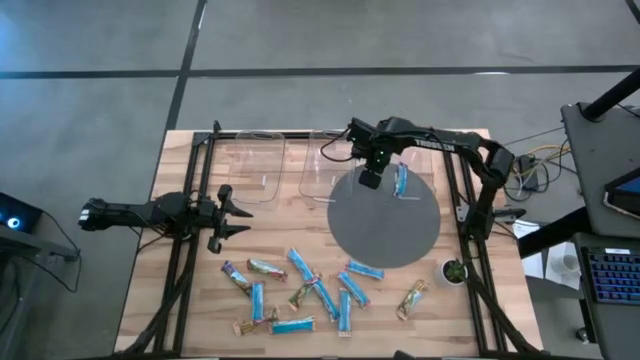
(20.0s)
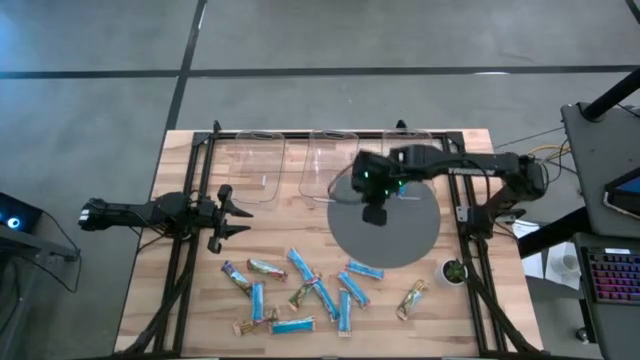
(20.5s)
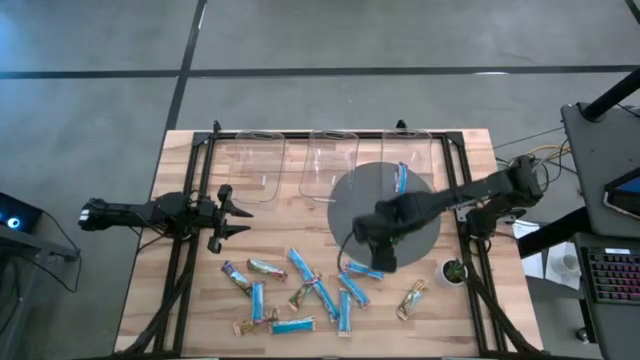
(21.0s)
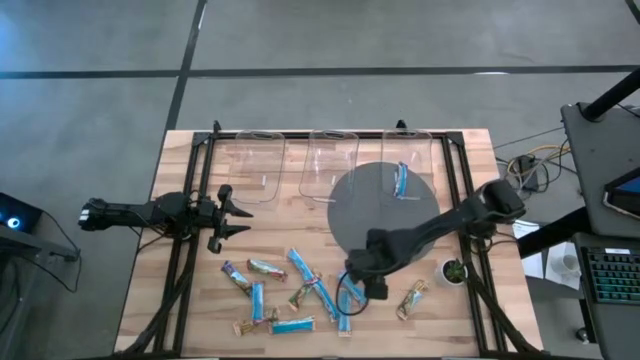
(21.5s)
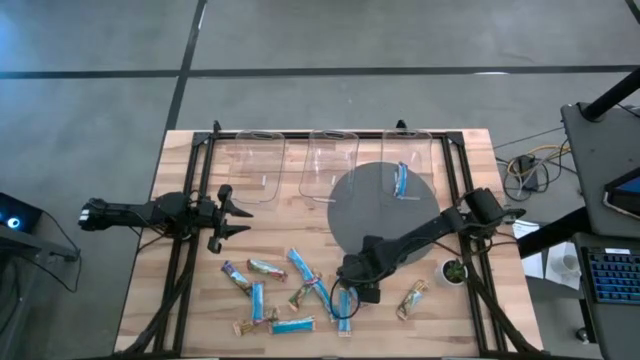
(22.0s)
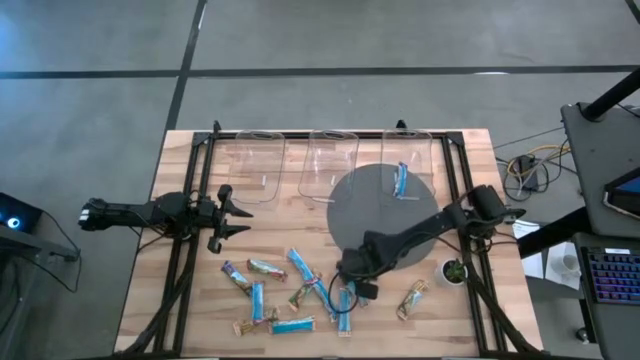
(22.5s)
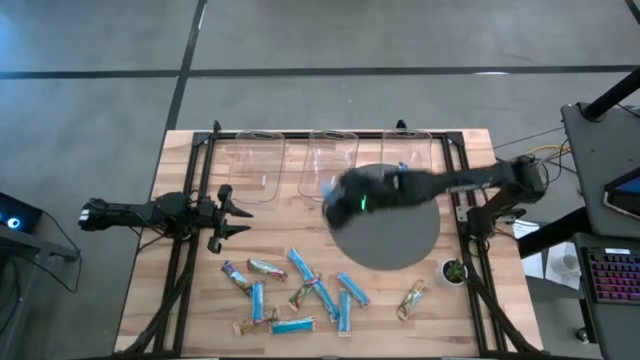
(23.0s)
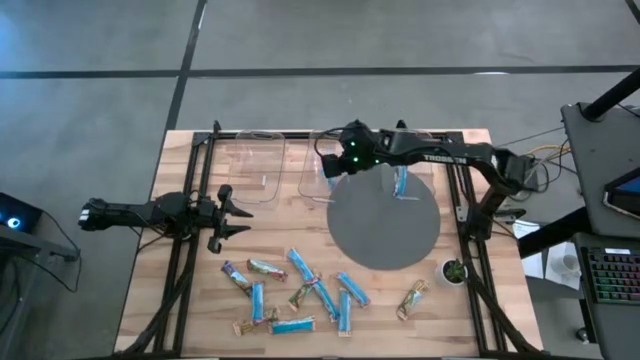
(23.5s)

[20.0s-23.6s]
Task: Pick and place Granola Bars by type
Put the red granola bar into the middle transparent bin

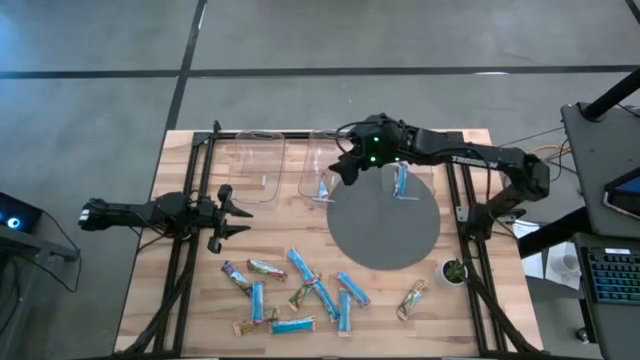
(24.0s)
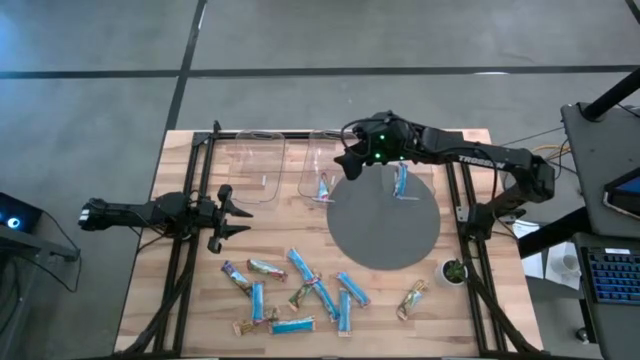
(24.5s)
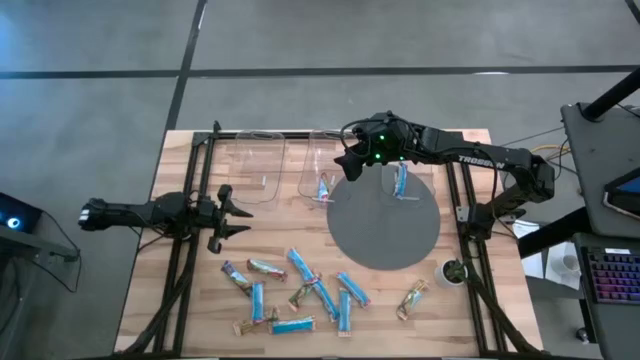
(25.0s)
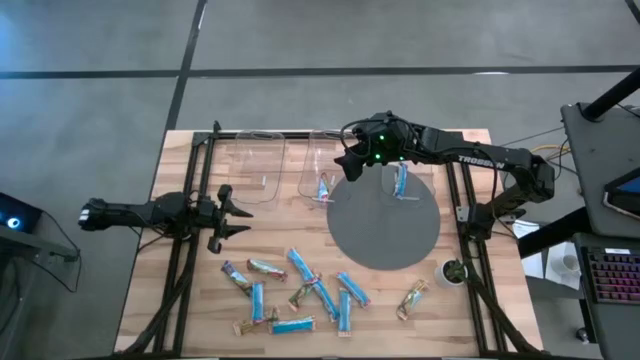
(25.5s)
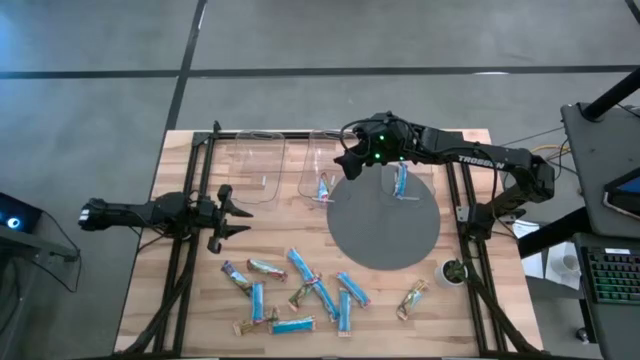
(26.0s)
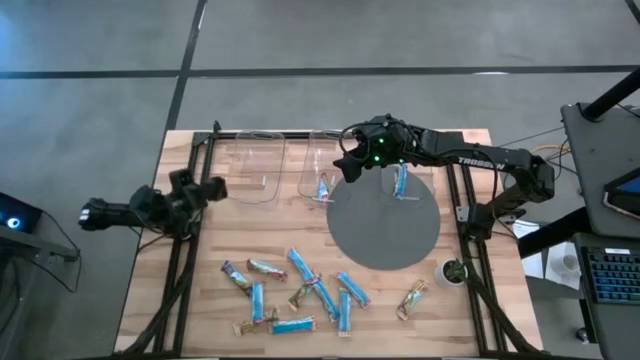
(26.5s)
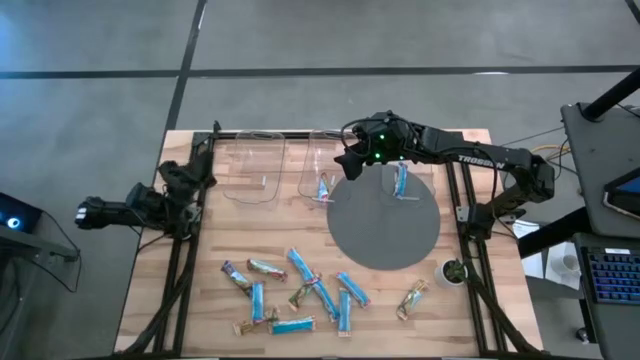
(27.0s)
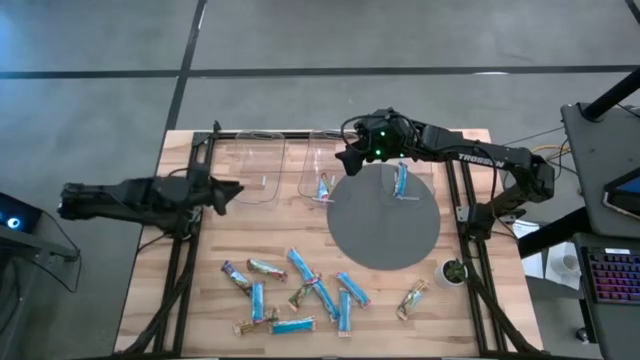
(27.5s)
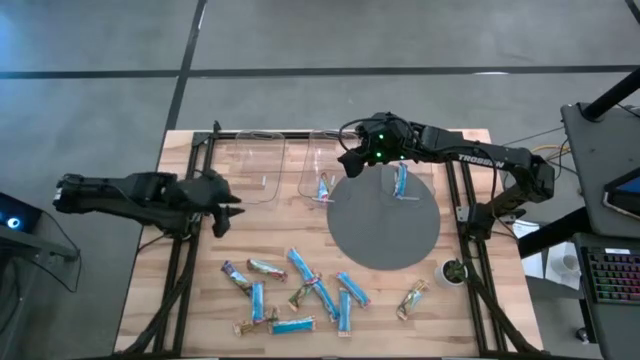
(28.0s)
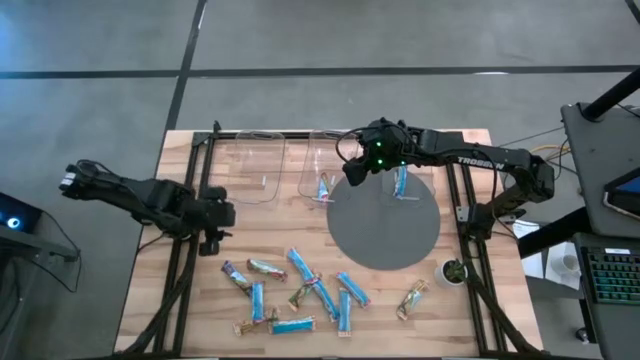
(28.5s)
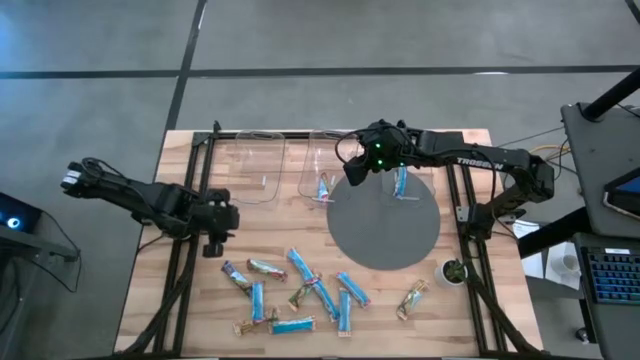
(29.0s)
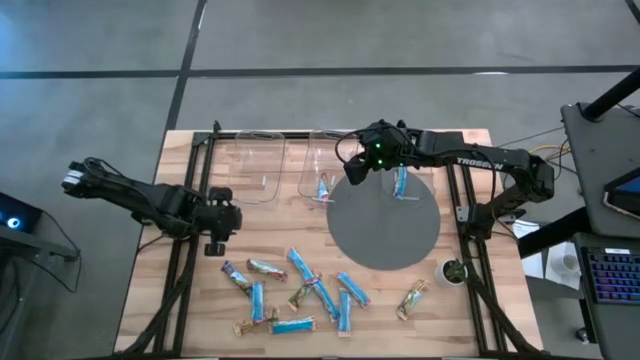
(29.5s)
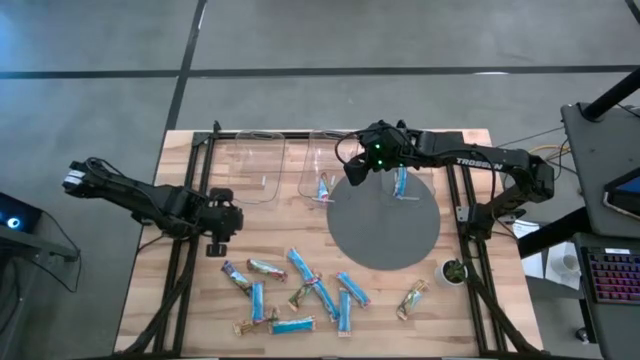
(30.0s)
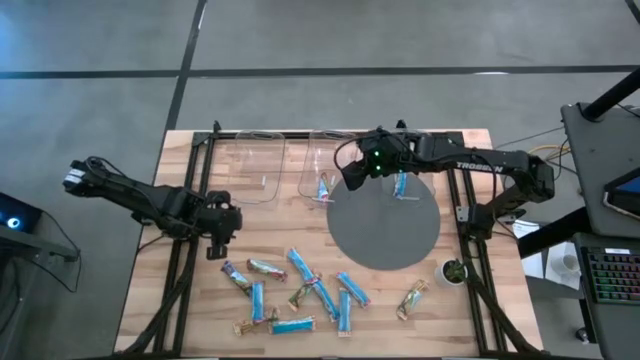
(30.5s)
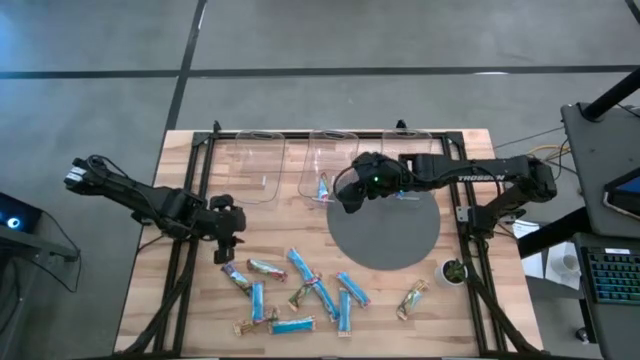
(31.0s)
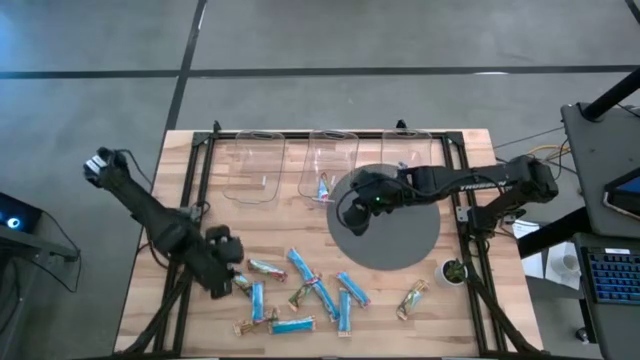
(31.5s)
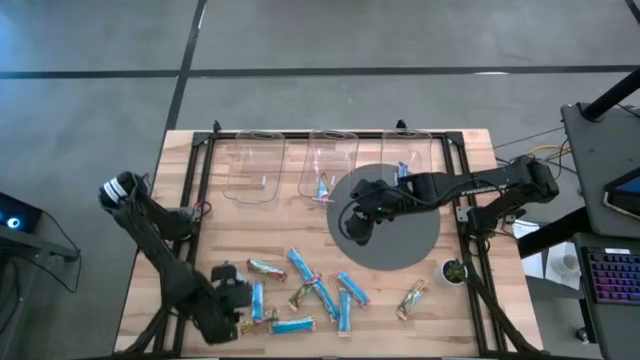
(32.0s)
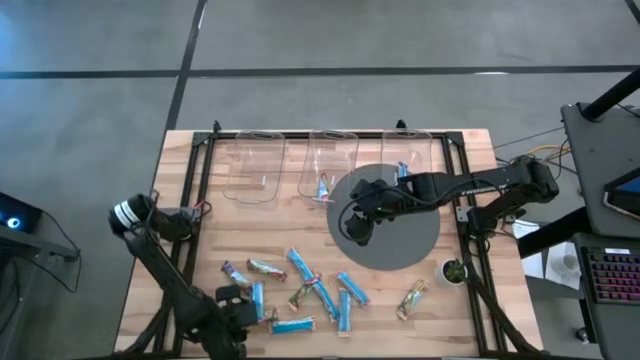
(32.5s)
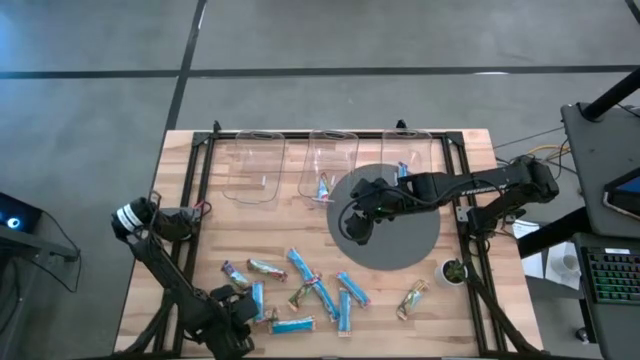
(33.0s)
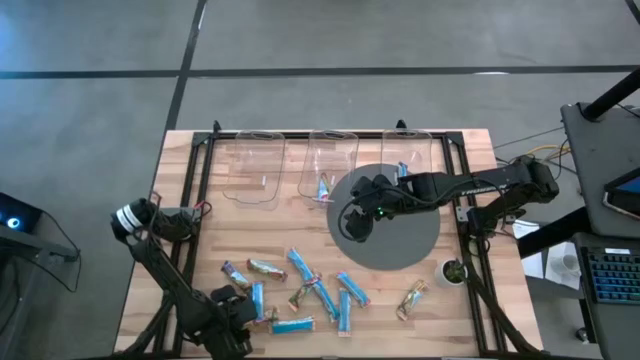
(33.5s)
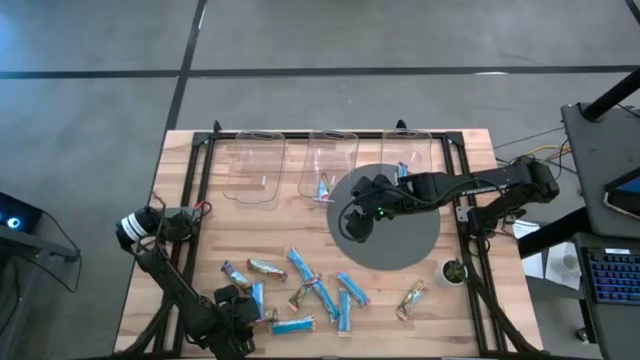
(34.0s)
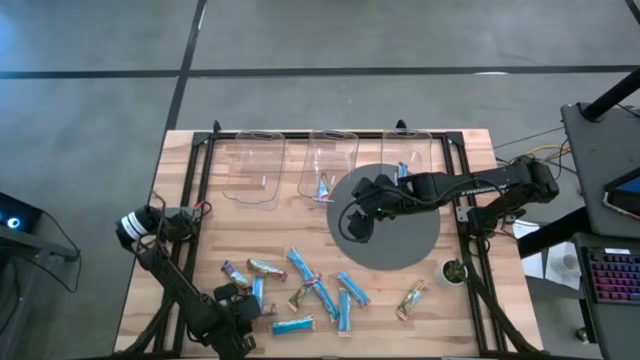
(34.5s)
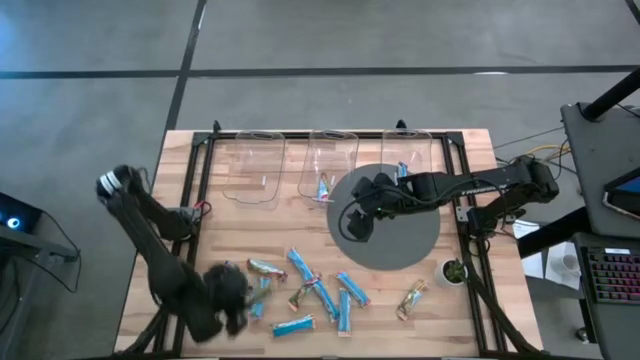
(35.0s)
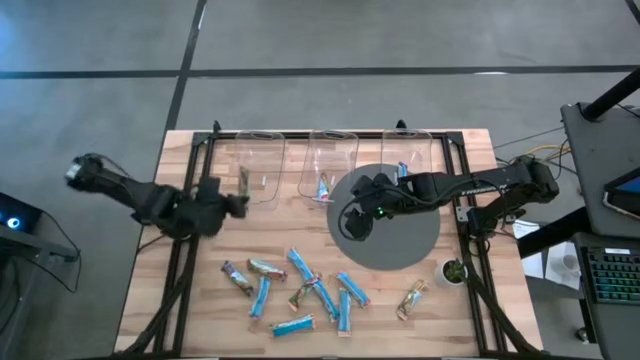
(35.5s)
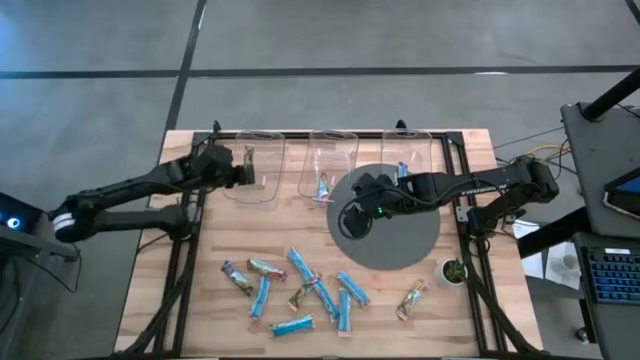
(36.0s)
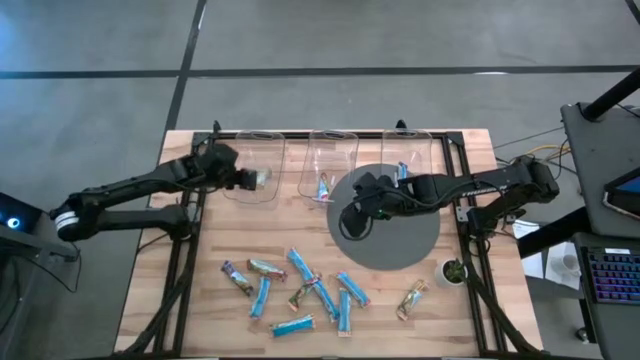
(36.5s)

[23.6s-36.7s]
Put the yellow granola bar into the left transparent bin

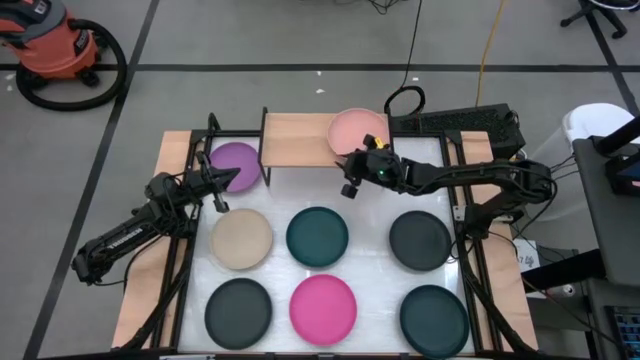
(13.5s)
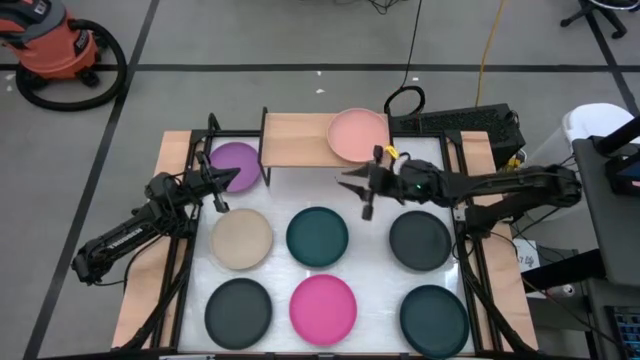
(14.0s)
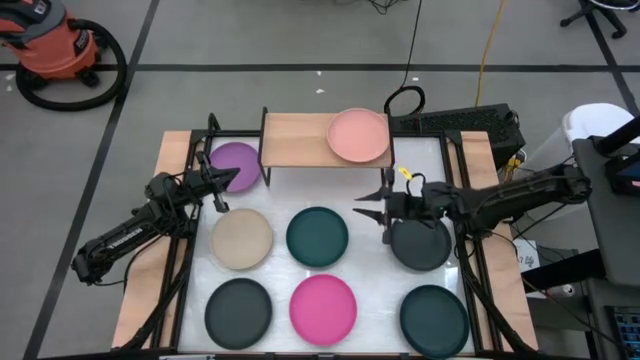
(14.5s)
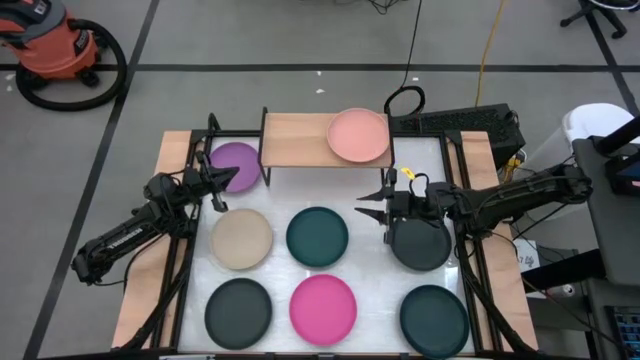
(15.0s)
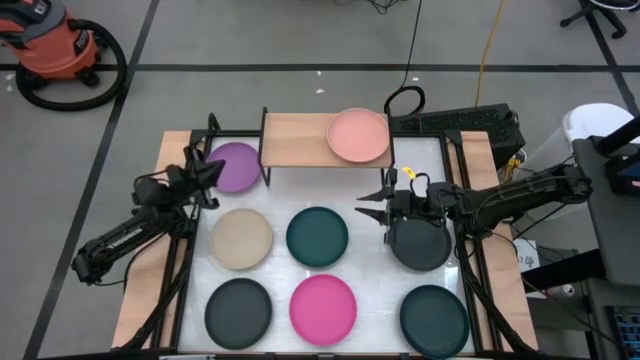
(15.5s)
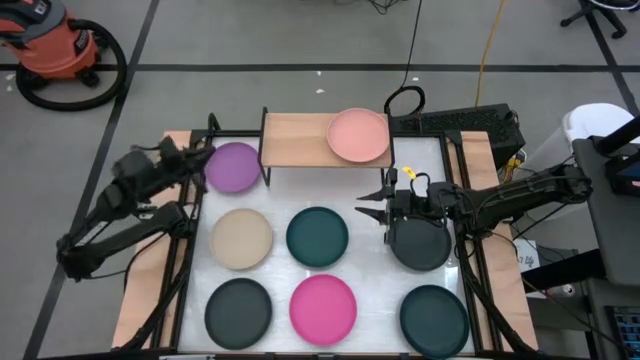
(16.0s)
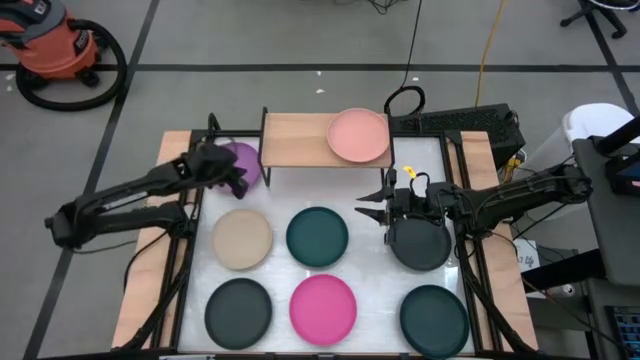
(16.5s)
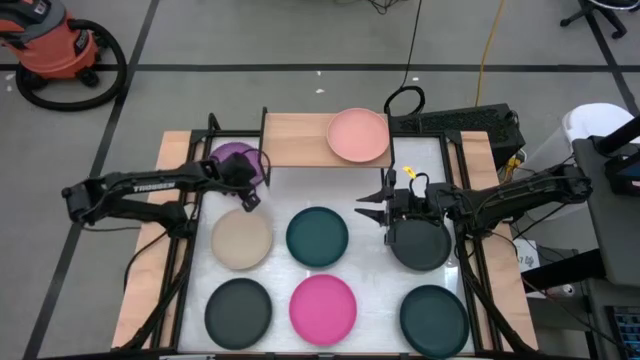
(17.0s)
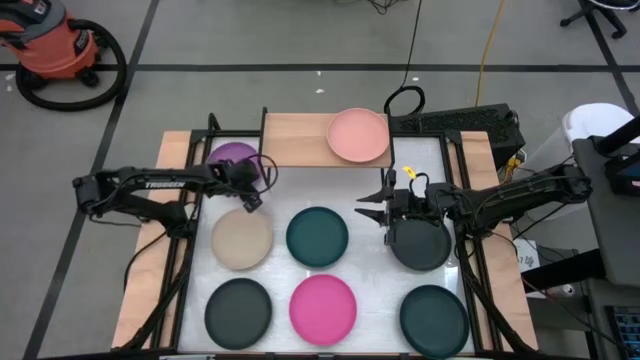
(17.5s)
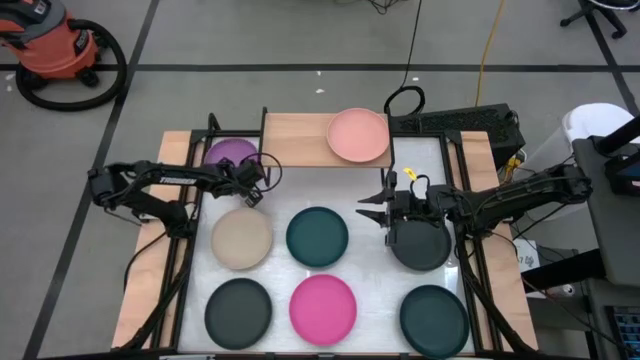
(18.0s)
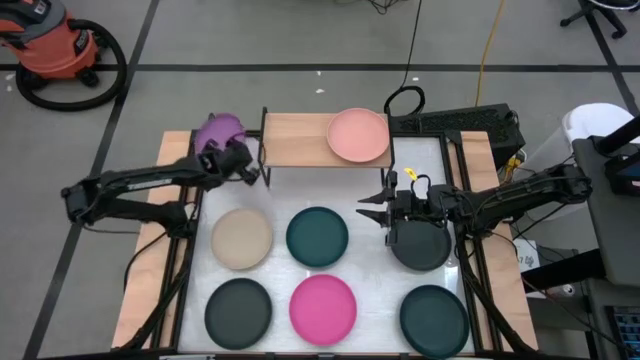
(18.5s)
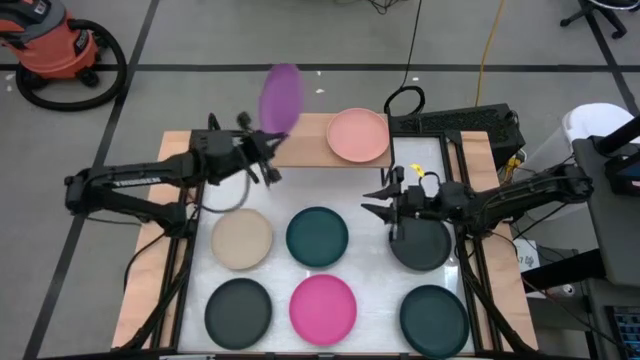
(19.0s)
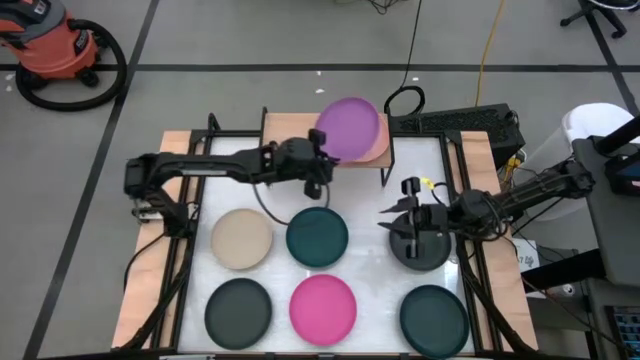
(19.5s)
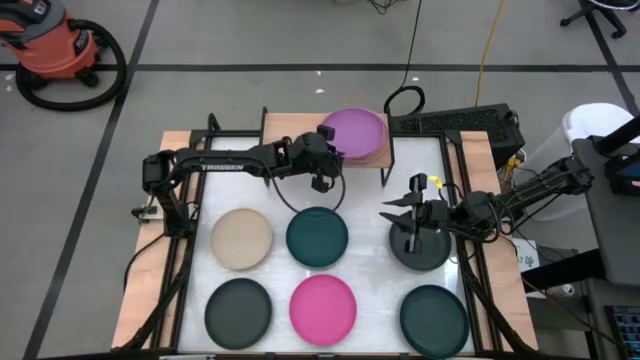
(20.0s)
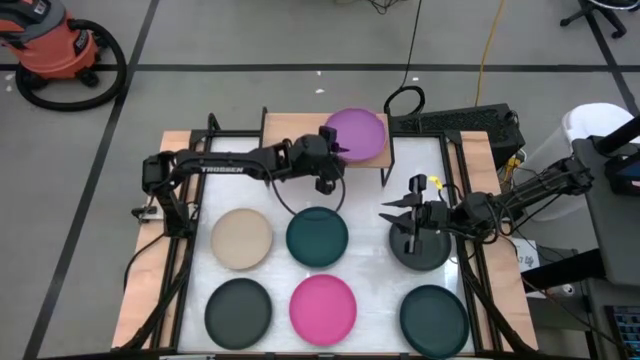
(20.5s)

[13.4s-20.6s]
Task: Place and stack plates onto a shelf
Stack the purple plate on the light orange plate
